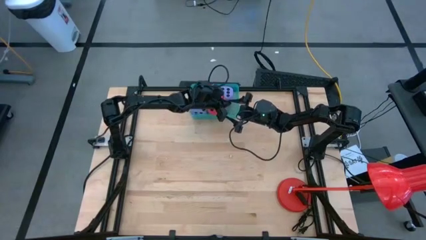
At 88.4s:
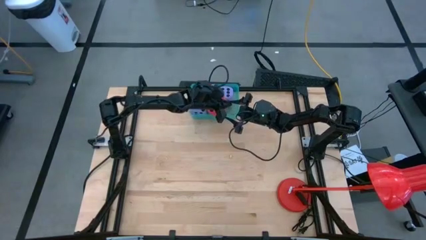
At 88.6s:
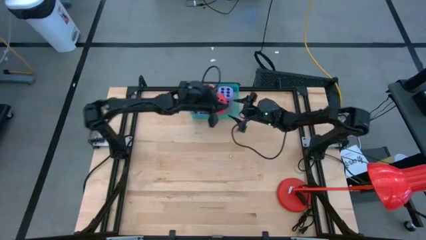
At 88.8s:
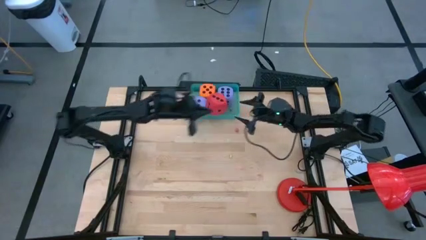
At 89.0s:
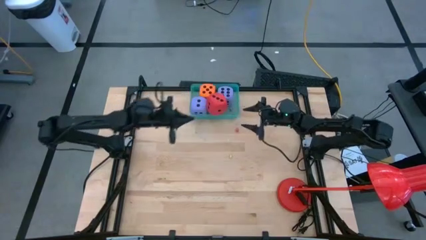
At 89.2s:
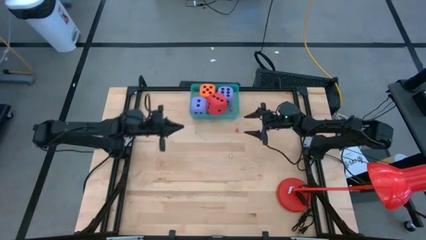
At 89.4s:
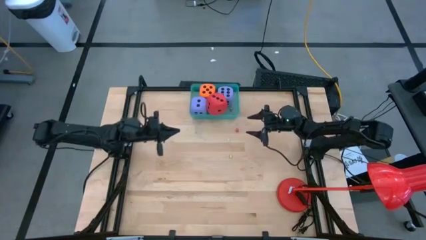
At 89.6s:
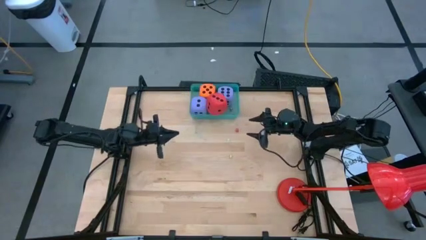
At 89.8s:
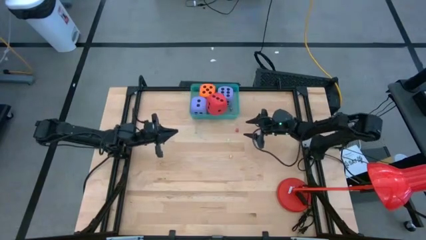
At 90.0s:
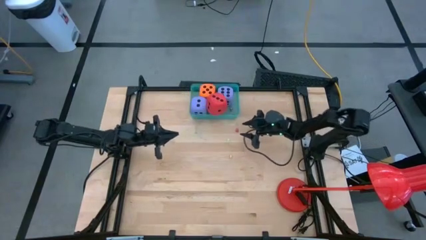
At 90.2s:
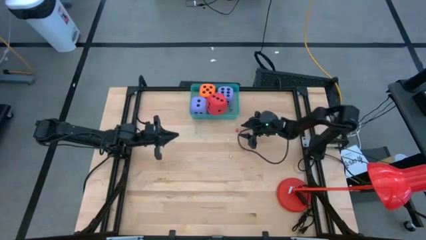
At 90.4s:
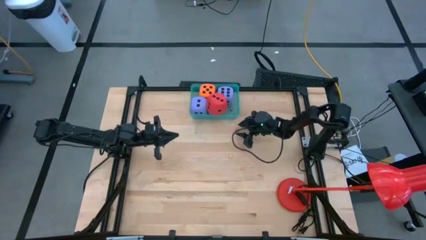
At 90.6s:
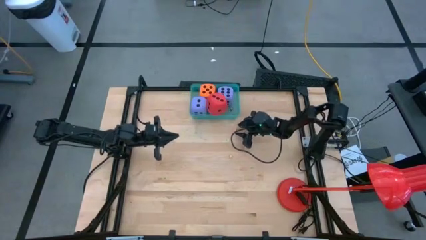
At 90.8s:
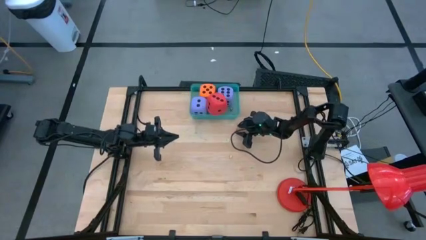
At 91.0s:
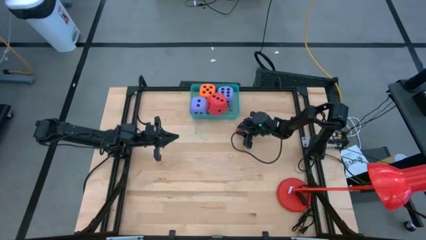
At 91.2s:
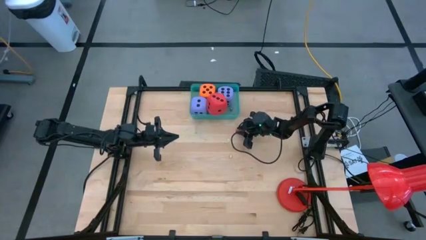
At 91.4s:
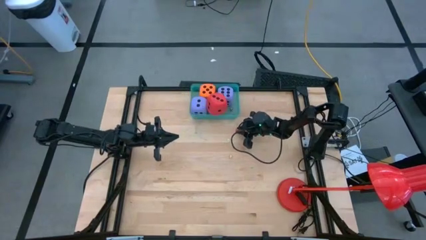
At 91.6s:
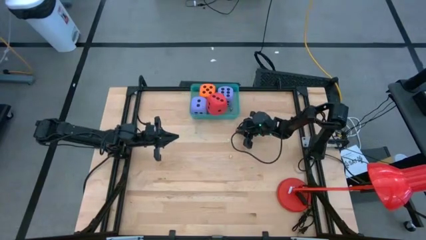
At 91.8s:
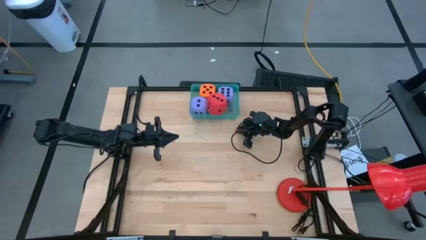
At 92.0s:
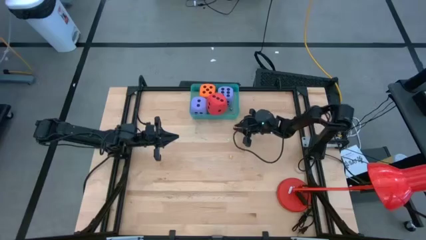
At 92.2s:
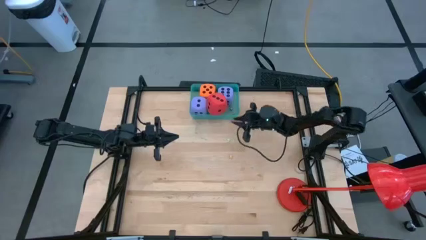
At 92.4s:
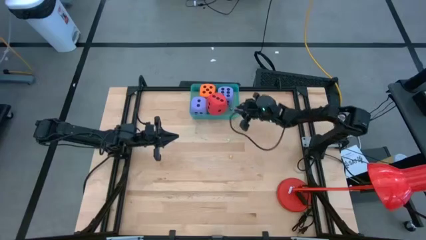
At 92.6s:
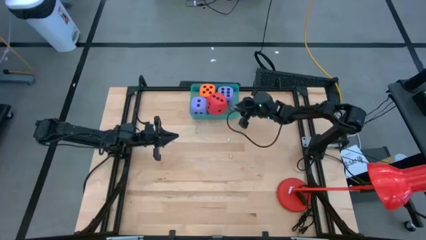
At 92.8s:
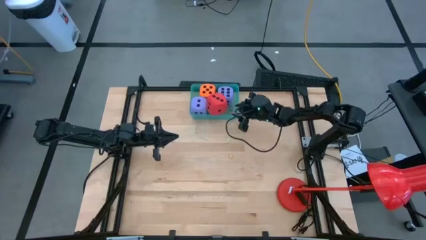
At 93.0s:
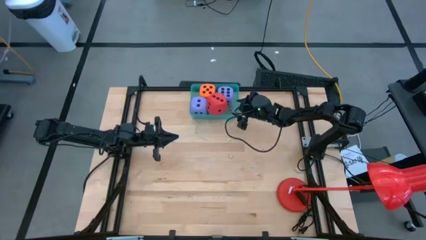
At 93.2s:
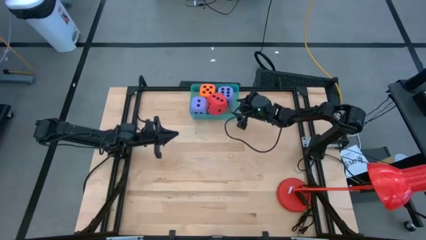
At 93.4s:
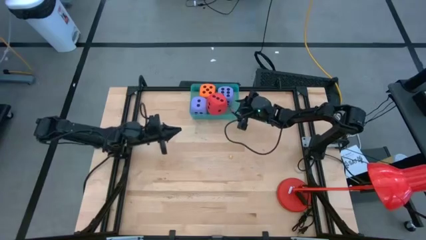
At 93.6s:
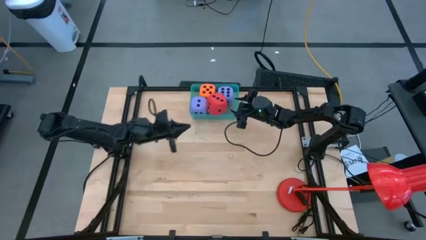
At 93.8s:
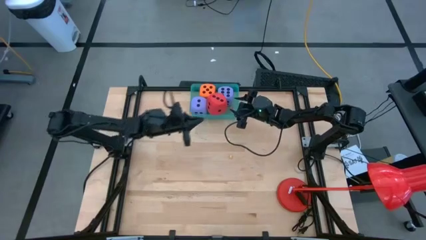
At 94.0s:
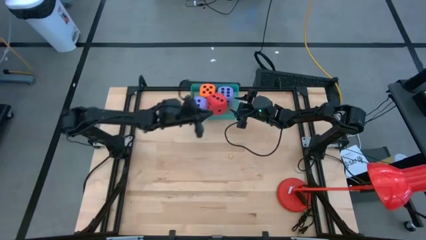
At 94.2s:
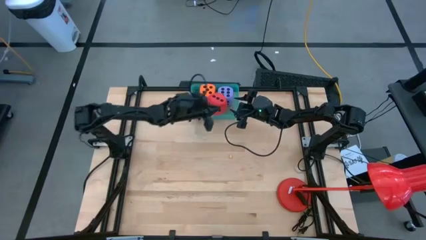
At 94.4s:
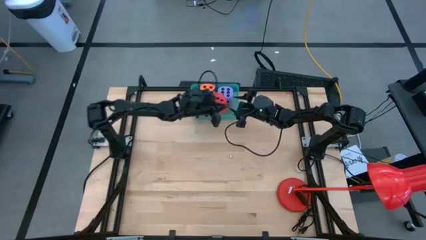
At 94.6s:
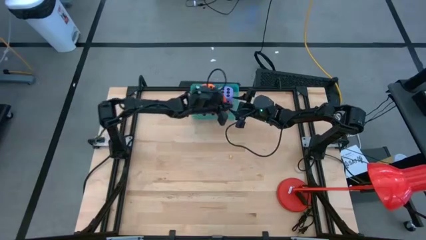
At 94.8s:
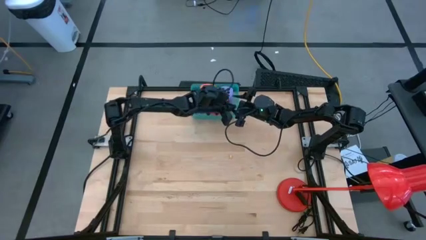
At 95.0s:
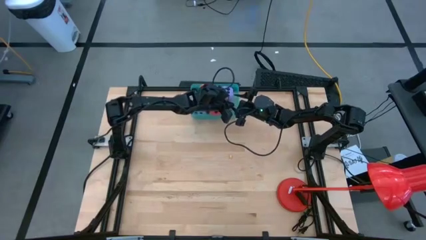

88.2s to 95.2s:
Task: Pick & Place Dice
Put the red dice into the green bin

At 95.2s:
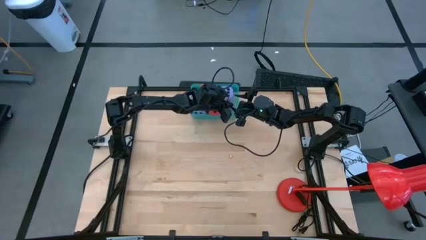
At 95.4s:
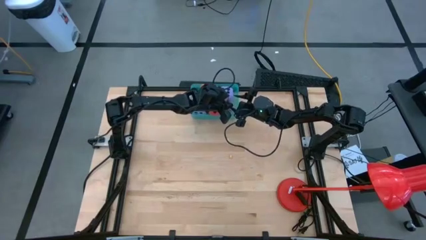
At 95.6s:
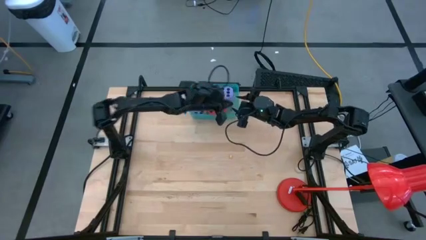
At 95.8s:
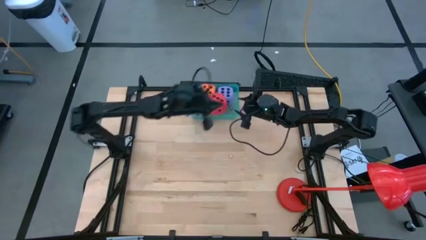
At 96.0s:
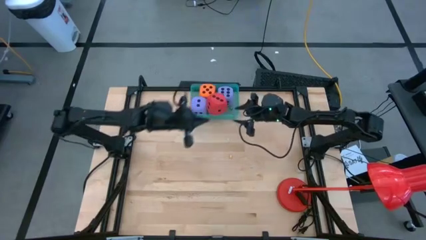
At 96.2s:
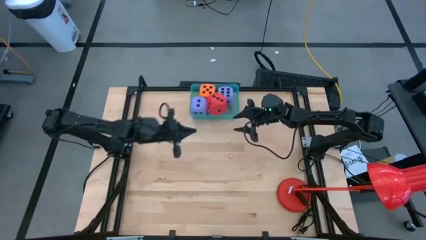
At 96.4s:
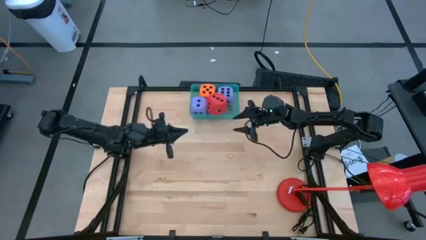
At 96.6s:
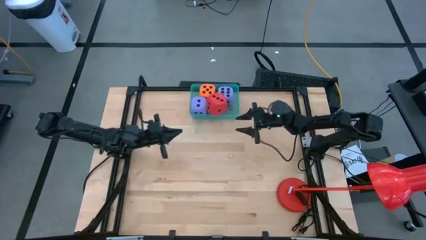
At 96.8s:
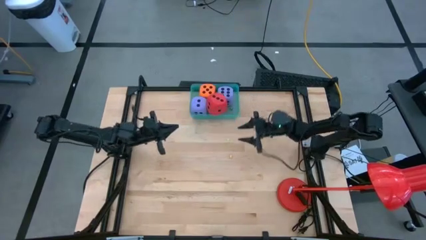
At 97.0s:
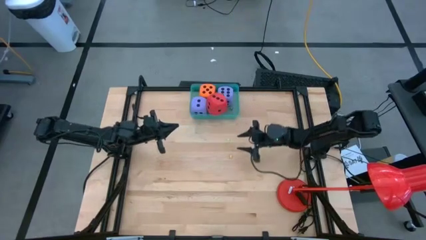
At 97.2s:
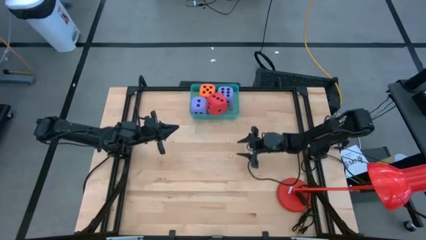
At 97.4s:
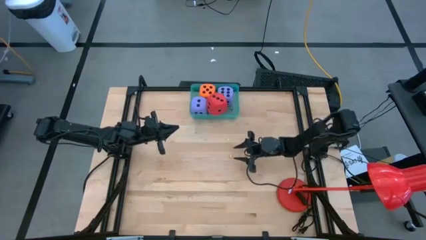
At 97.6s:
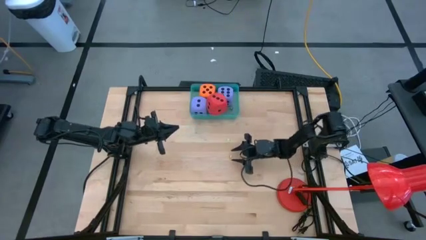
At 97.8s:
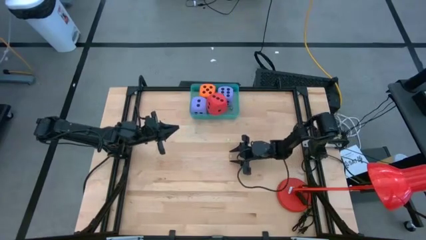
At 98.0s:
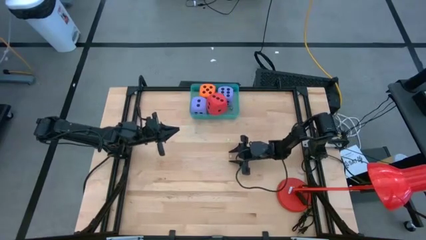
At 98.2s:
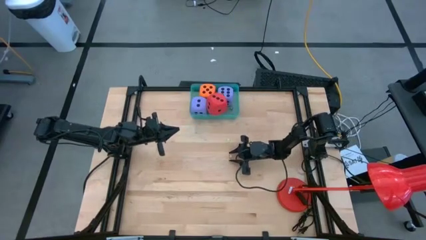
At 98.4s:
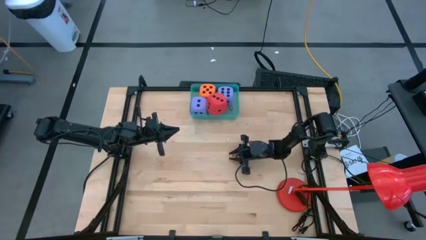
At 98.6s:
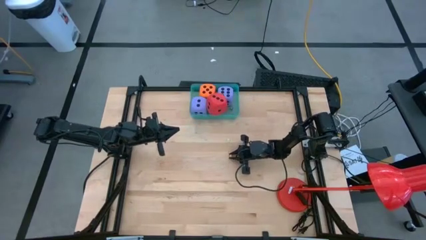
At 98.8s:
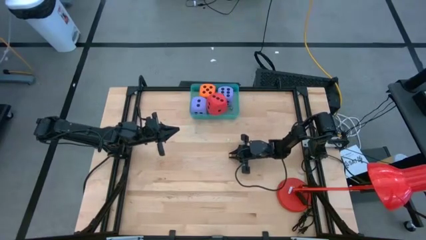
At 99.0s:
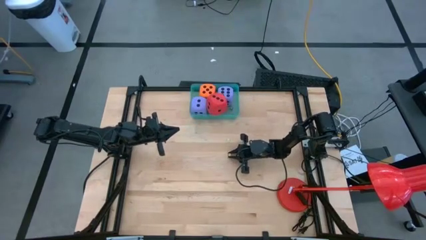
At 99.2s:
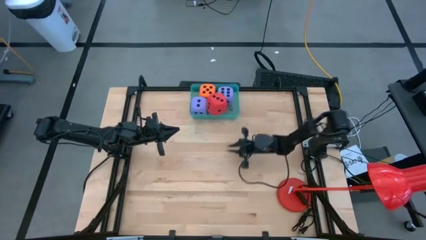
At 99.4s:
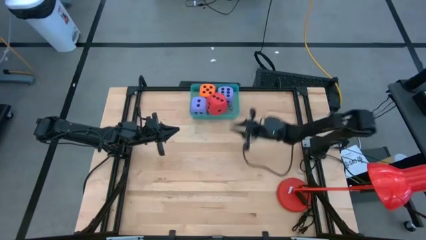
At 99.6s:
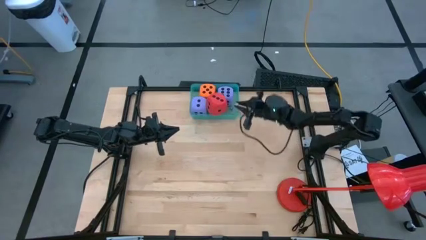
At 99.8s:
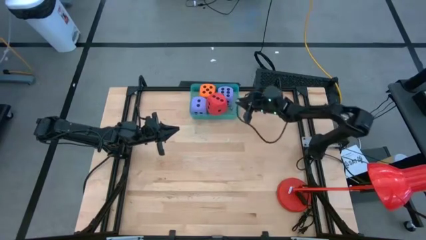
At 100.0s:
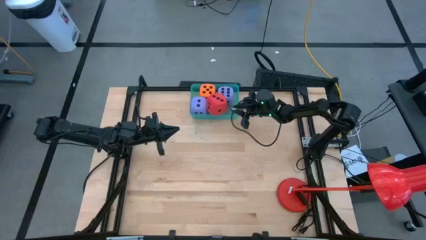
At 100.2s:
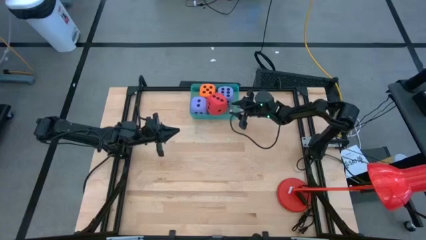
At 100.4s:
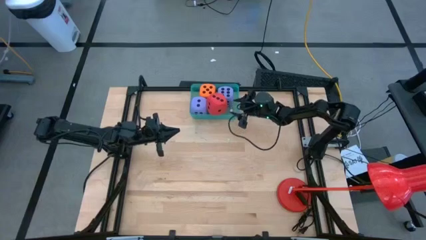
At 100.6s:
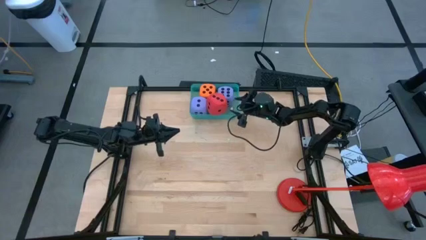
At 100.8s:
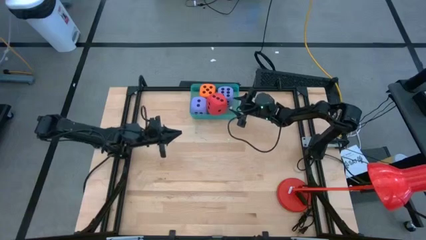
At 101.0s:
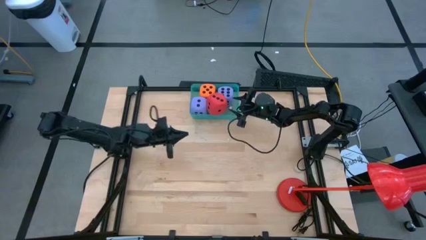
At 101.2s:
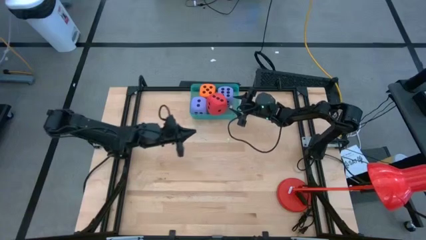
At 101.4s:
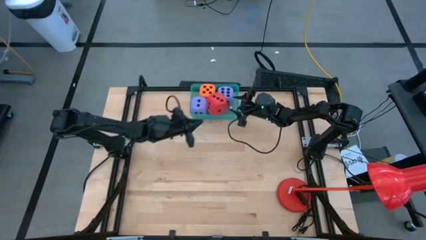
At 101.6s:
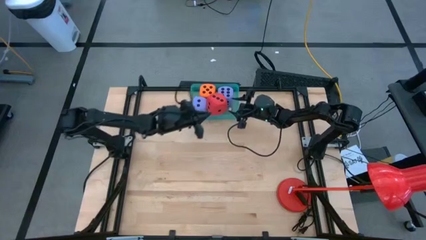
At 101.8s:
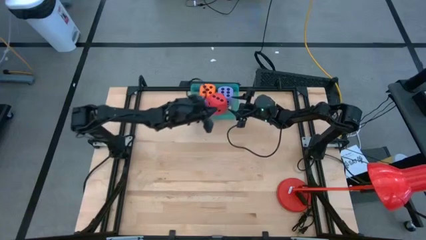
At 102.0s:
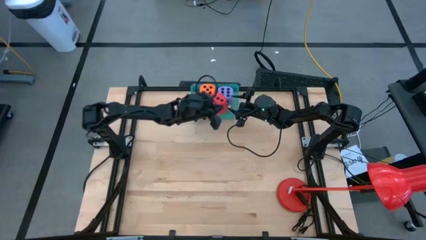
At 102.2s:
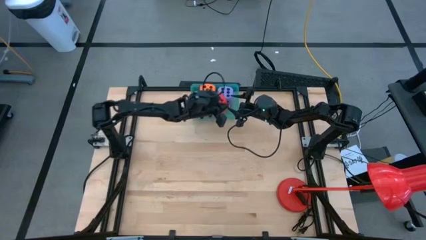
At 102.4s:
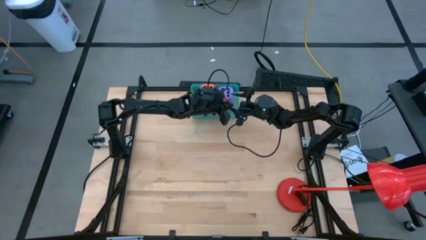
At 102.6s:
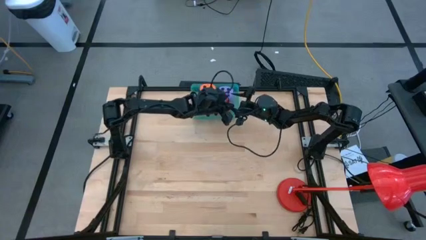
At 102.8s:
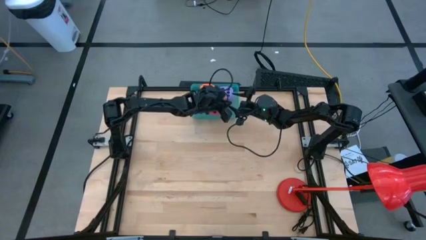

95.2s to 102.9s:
Put the orange dice into the green bin

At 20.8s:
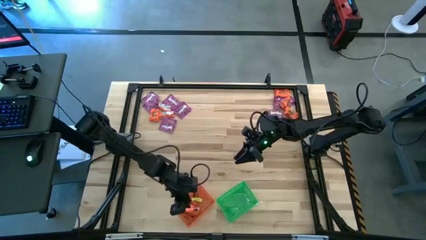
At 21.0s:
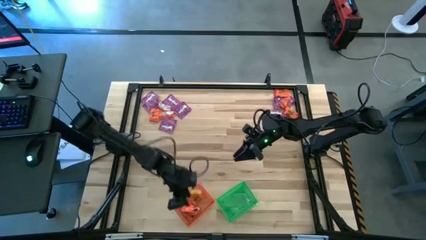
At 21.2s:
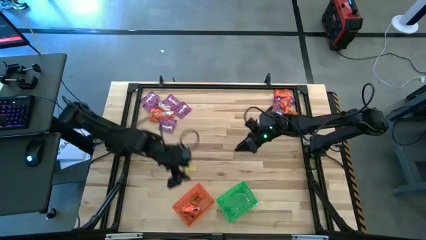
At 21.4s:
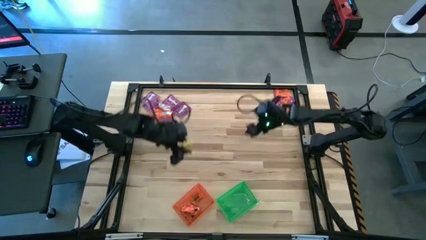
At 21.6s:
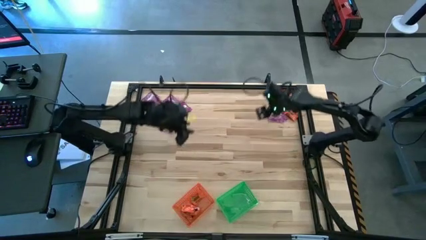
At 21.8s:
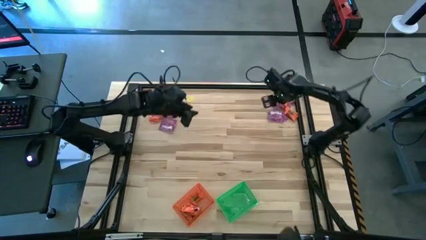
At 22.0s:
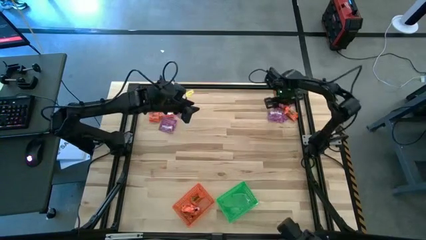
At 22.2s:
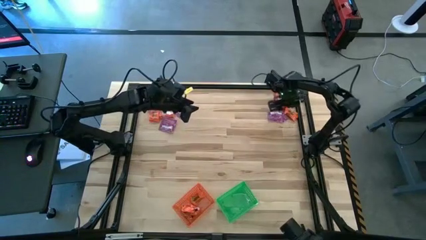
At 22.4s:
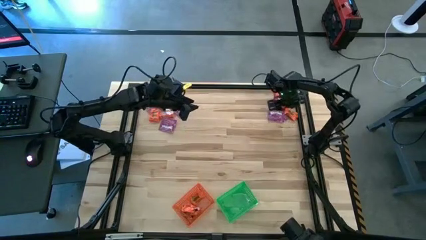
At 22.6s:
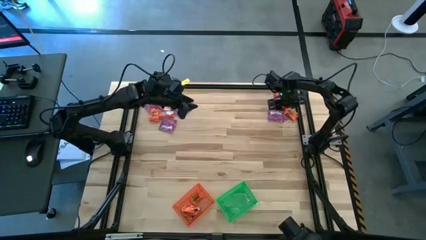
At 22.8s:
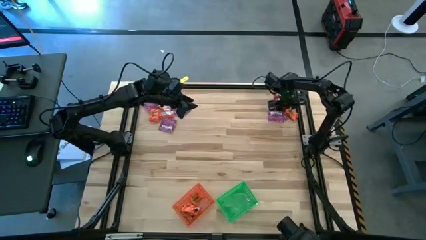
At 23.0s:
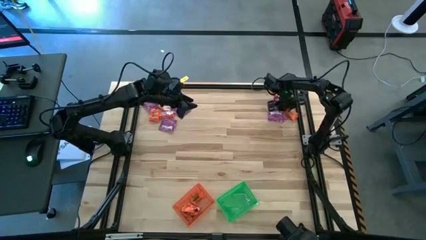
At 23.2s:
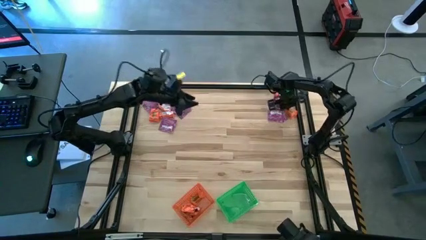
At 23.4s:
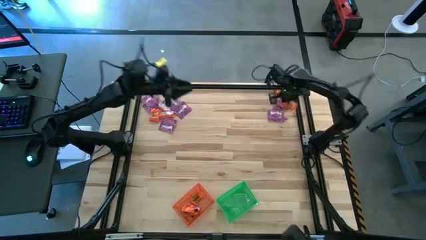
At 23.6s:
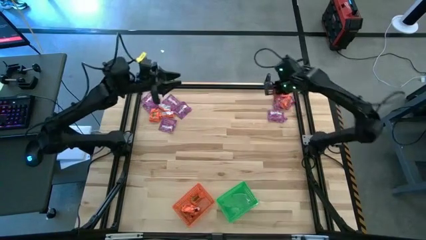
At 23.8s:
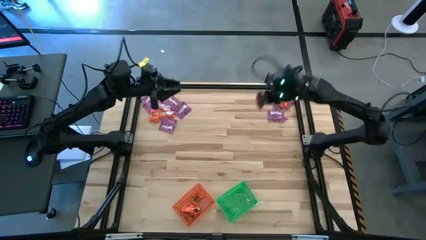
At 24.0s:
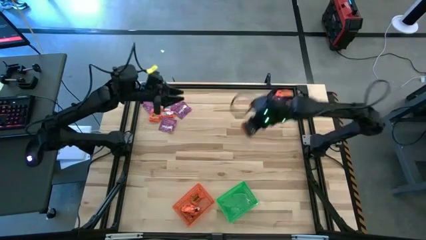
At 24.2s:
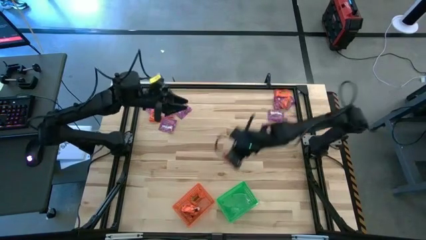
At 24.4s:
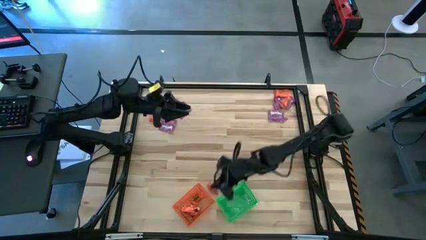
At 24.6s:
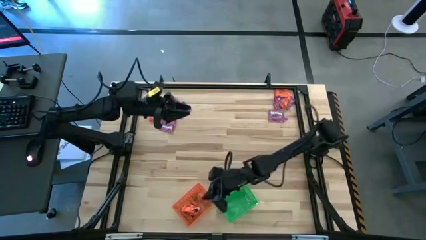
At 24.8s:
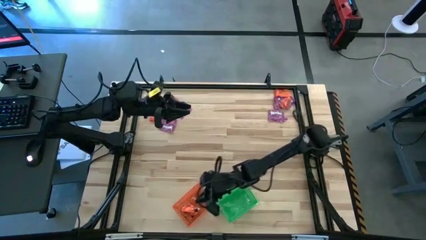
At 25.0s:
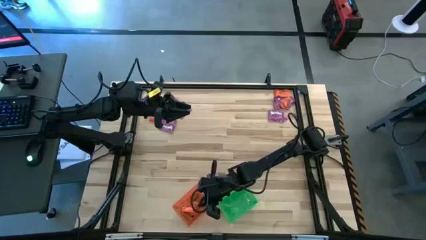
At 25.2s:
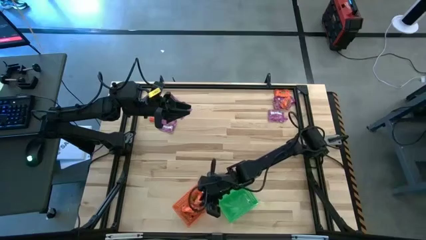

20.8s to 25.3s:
Task: Sort candy by brand, put in halloween buckets
Put the orange candy into the orange basket
